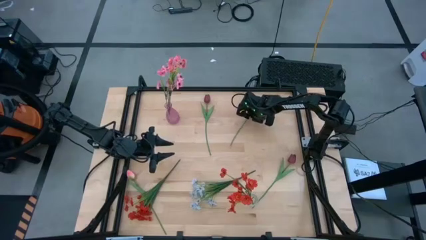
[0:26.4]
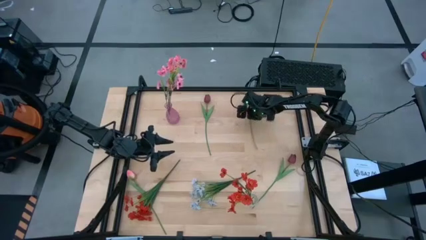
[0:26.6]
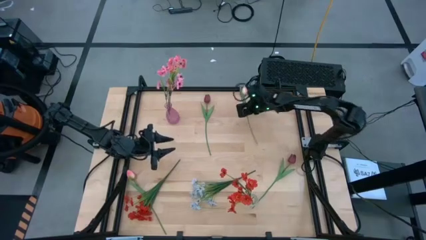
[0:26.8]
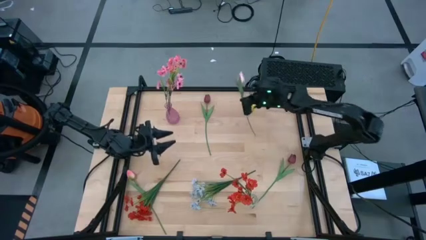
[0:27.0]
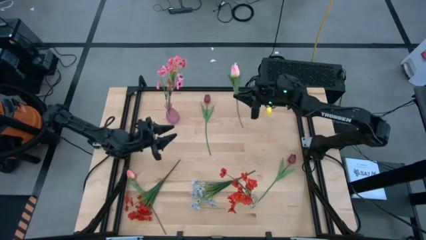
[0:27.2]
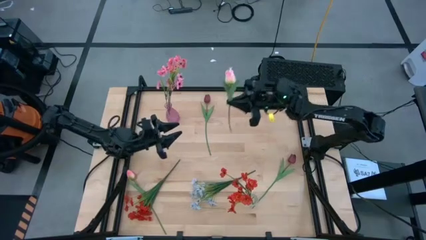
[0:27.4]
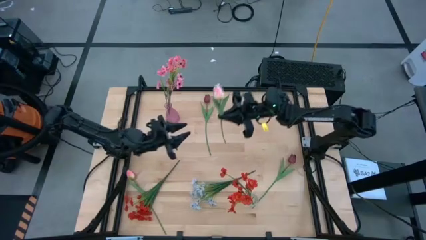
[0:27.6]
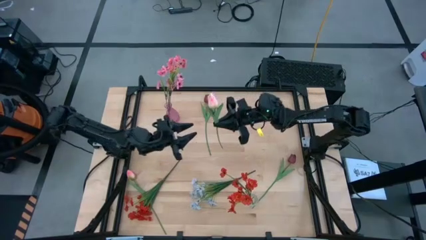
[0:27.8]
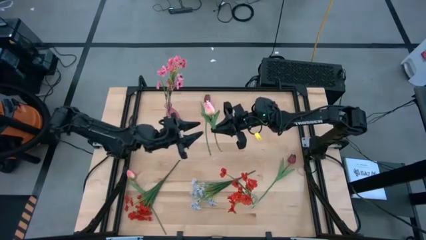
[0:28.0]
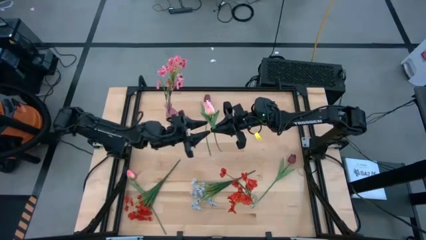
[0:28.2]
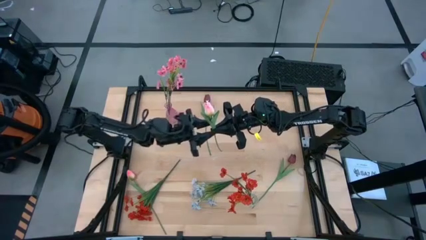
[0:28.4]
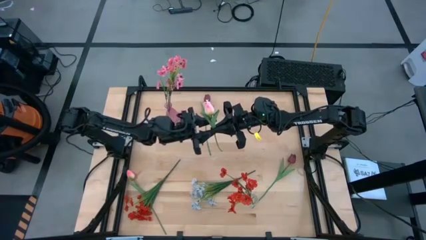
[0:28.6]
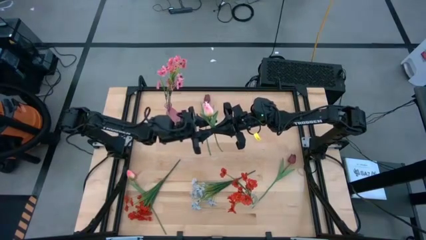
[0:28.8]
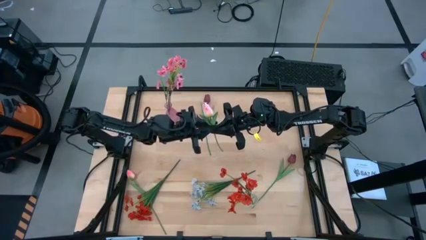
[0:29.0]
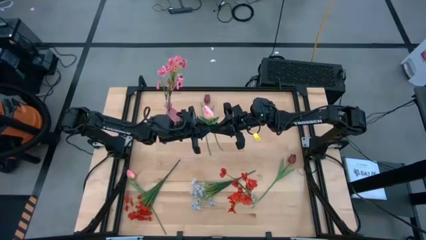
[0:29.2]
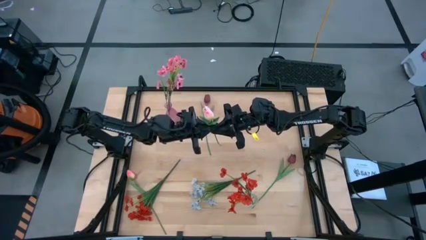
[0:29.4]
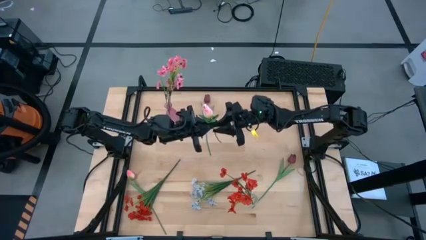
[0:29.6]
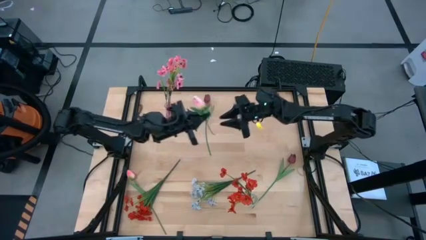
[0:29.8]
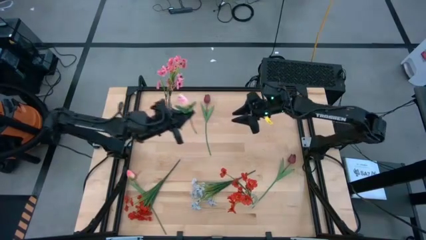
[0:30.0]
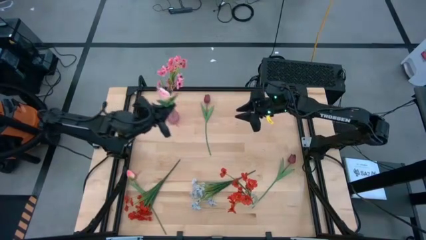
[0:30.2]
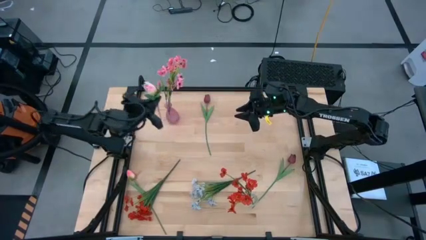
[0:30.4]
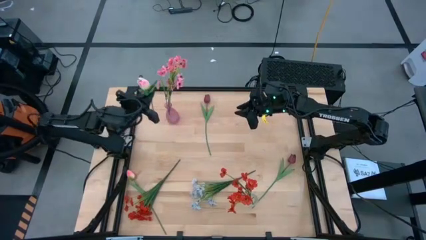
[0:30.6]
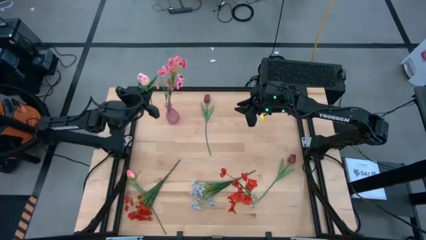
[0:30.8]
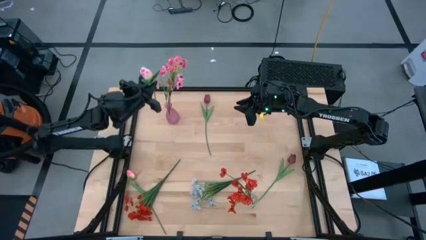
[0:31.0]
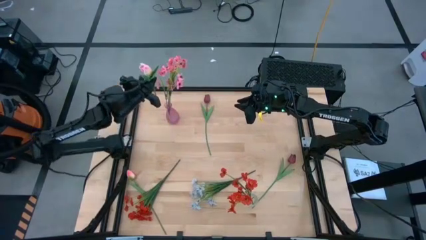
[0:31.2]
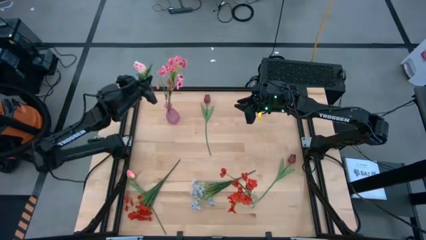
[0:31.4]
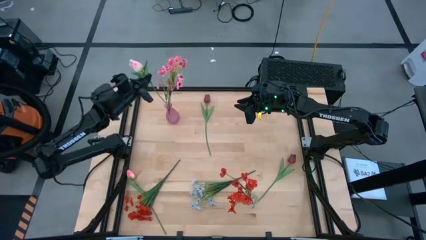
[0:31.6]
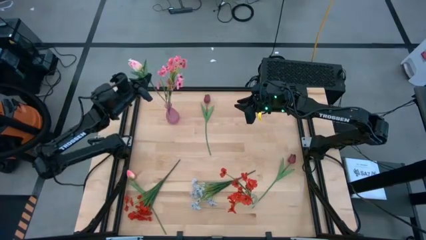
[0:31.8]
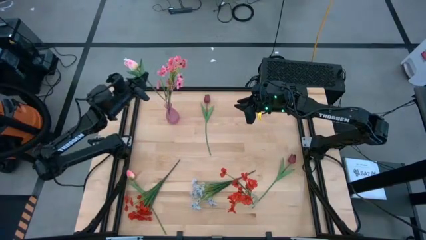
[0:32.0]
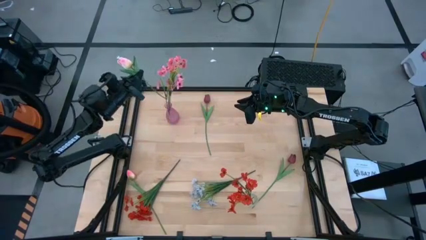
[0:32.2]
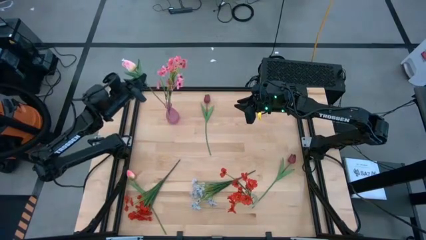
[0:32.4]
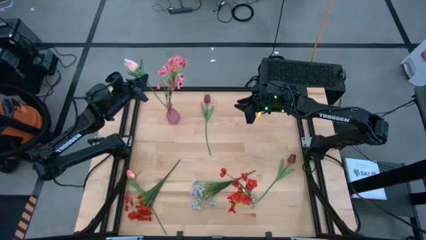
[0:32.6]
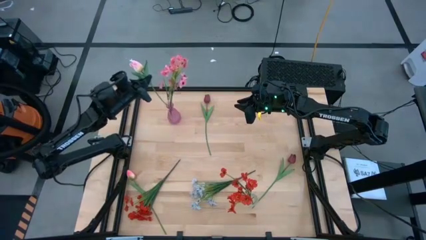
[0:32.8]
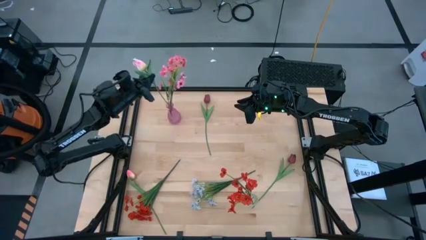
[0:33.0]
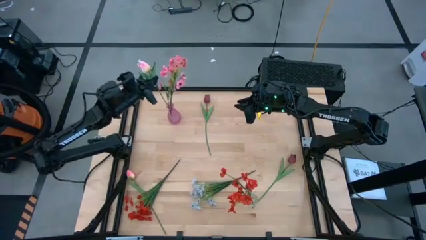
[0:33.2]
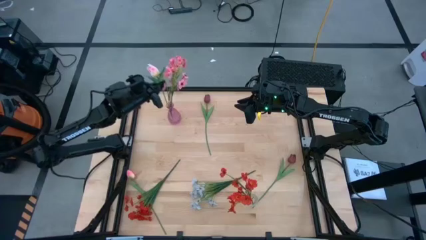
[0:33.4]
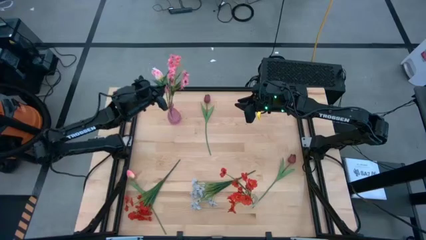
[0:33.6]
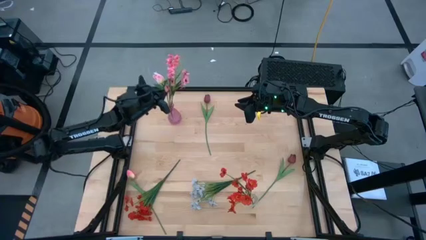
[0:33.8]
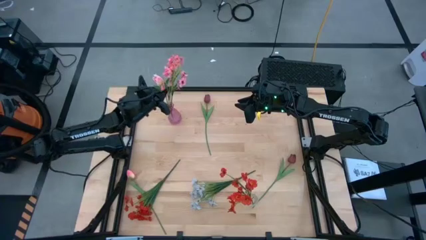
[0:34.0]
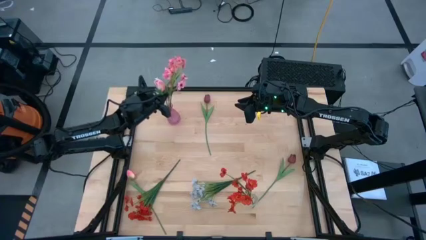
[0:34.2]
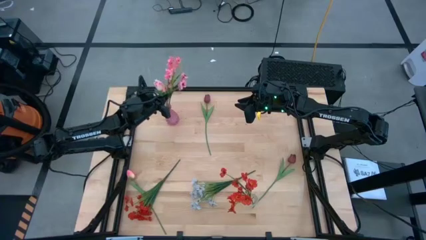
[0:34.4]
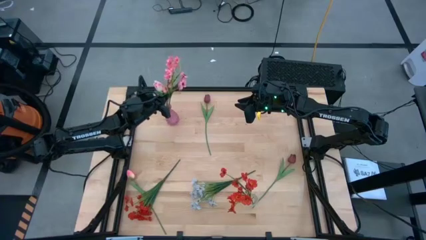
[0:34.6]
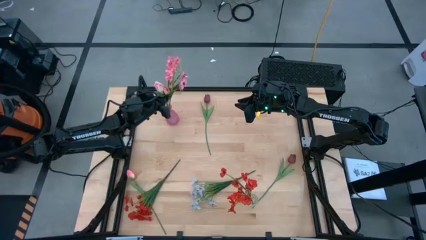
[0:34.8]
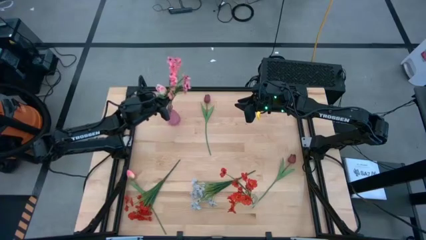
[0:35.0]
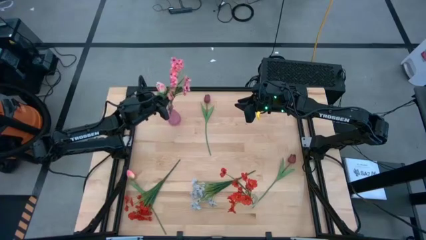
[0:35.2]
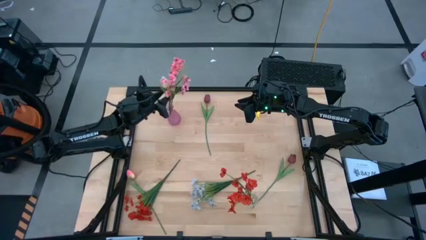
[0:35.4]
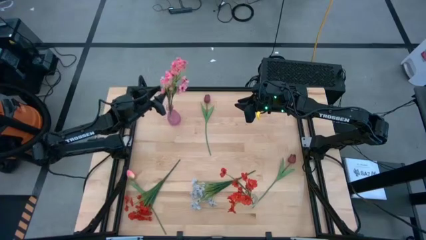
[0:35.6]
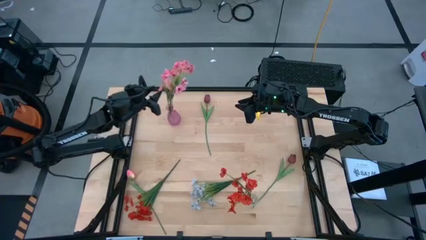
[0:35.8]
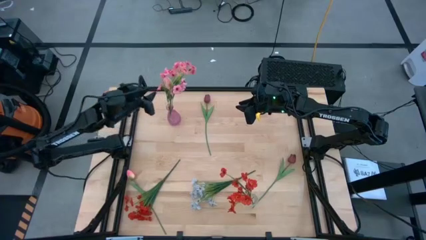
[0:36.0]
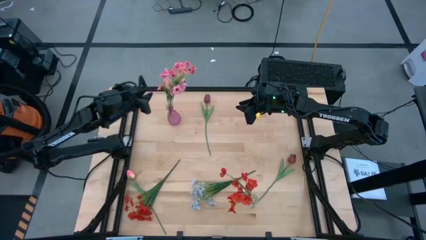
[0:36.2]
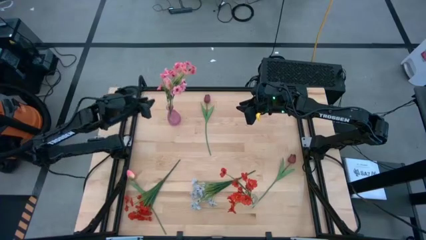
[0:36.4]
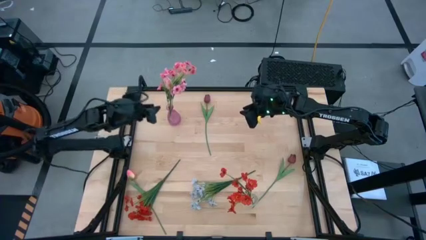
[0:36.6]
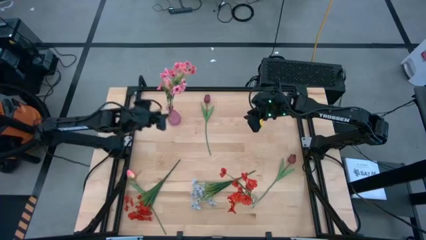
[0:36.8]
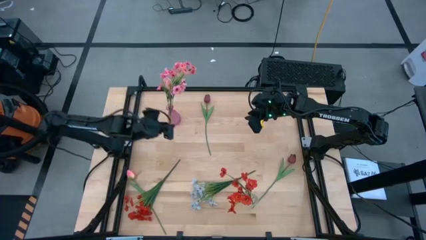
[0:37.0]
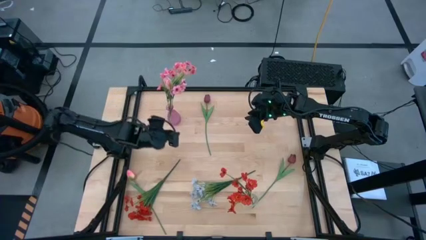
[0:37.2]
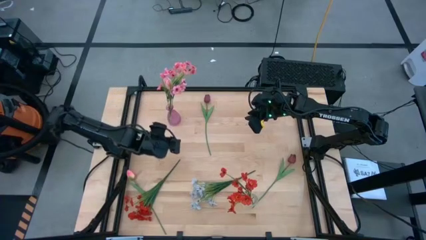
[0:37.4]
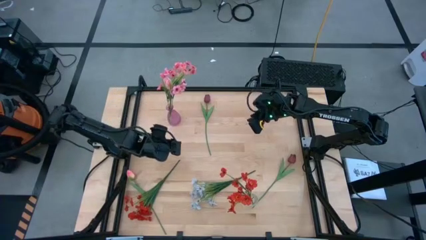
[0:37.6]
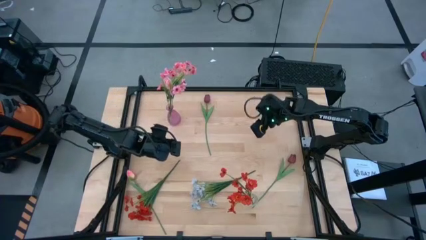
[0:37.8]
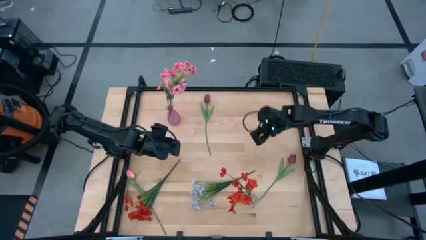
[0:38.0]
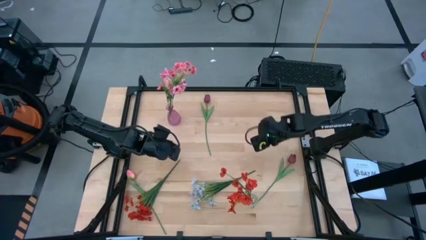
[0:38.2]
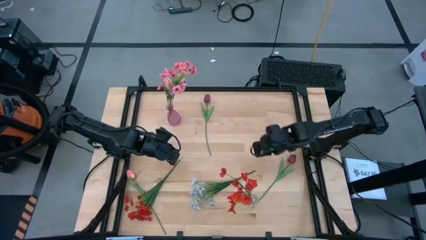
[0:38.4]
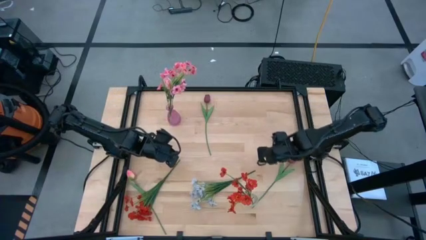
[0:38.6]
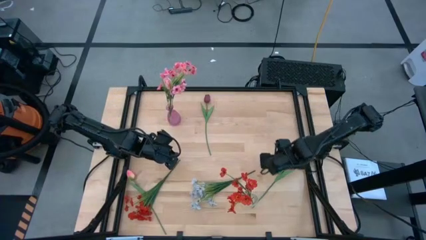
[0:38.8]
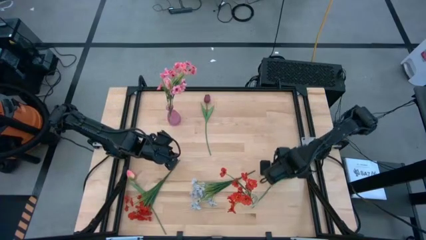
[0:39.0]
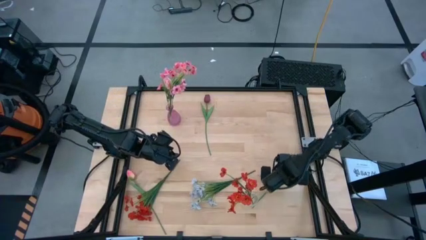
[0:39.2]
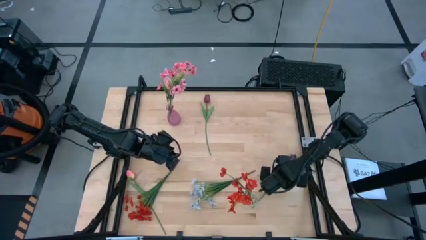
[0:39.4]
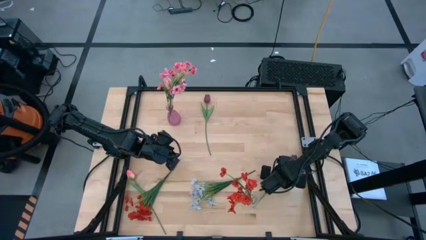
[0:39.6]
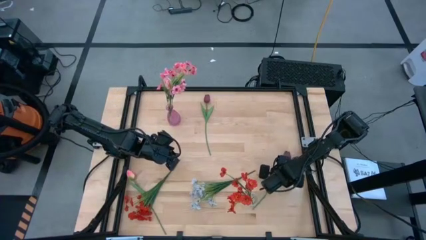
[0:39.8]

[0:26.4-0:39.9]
Task: Sort flowers into vase by color
Put the right pink tulip flower into the pink vase
